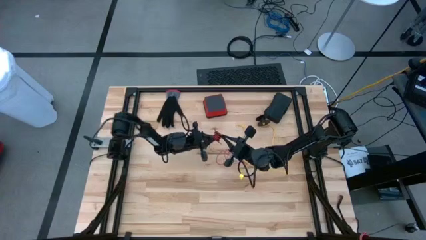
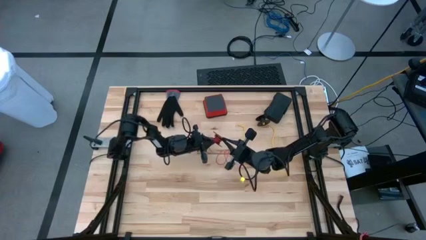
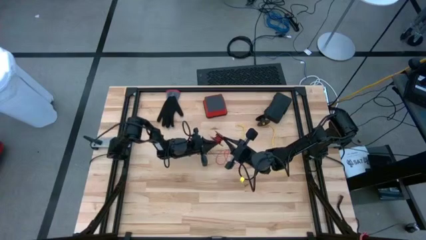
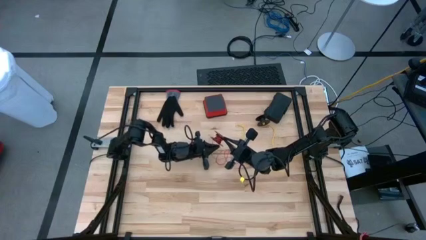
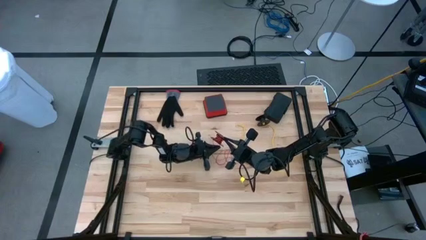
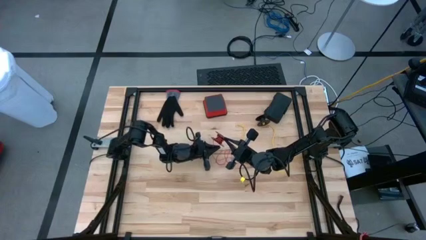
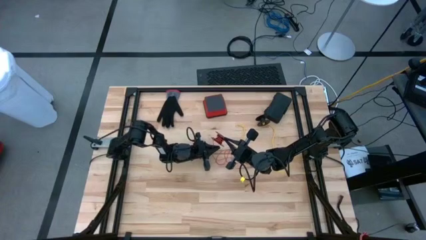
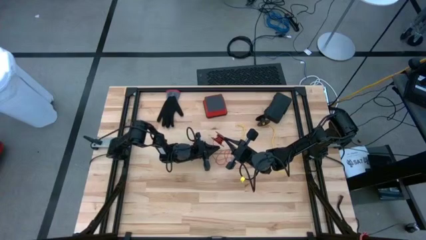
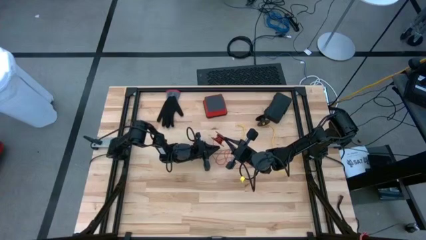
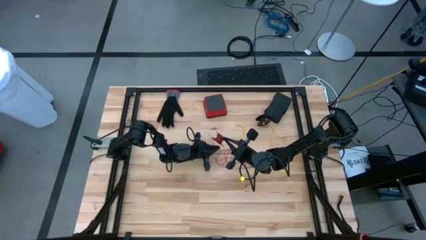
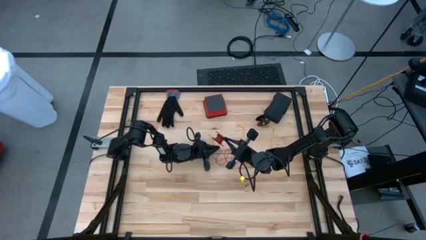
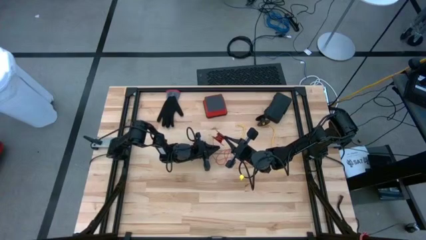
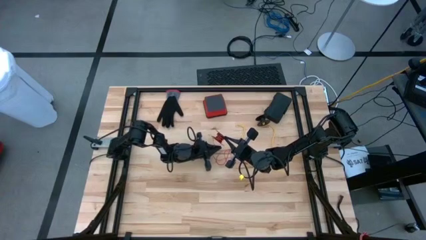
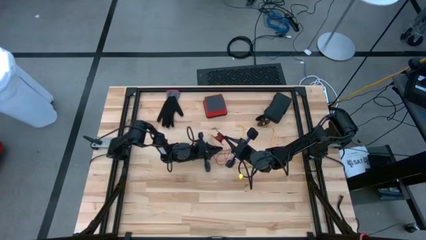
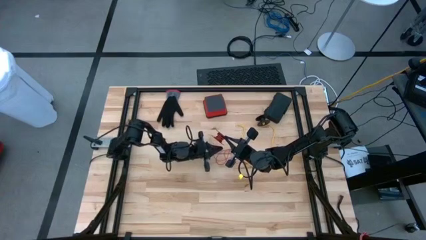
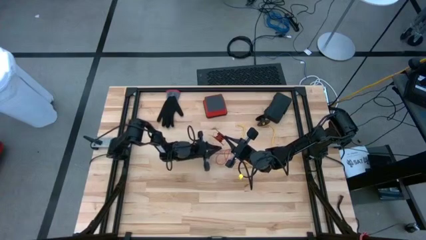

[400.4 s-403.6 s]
Task: Coil cords
Coil the red wire onto the spool

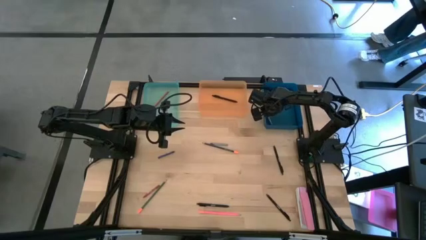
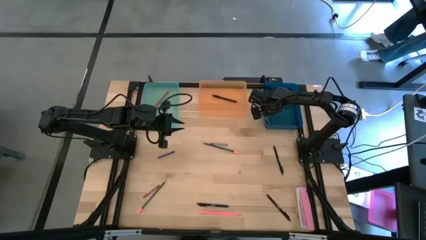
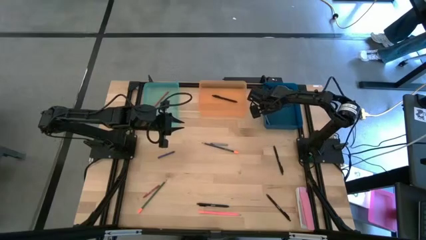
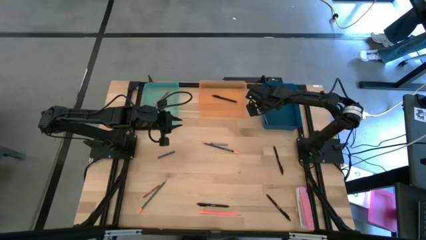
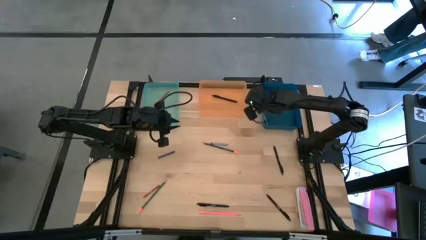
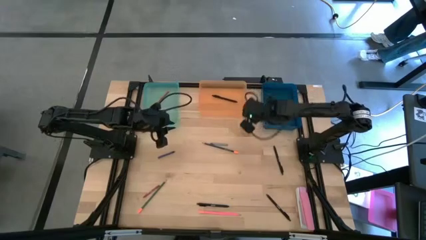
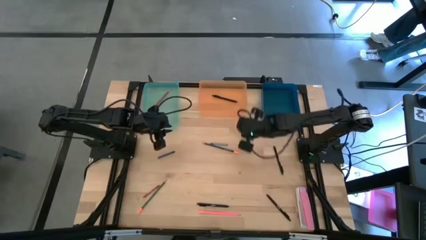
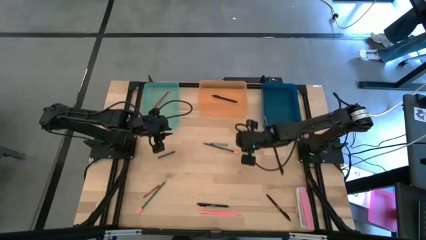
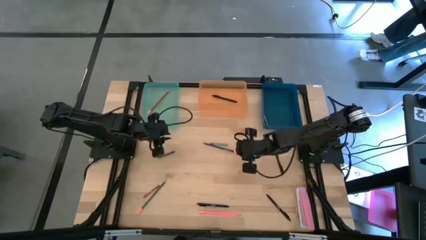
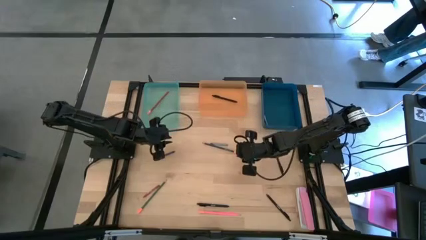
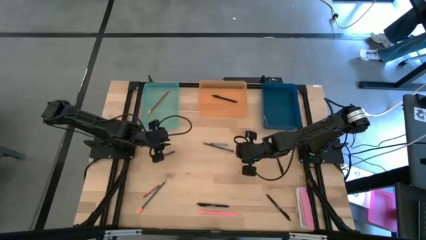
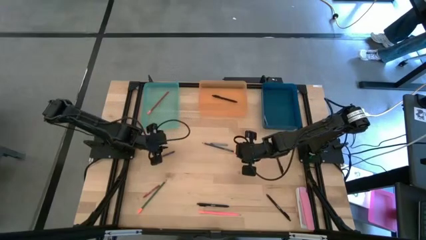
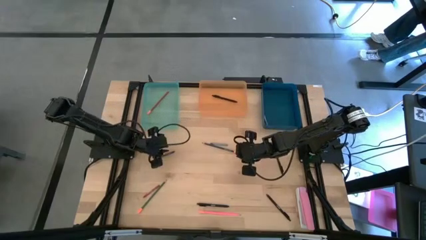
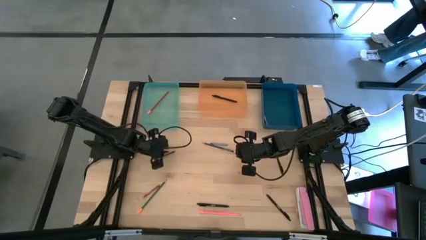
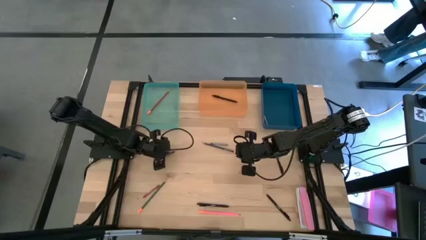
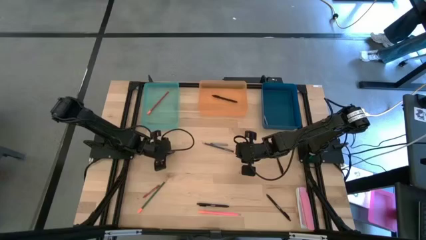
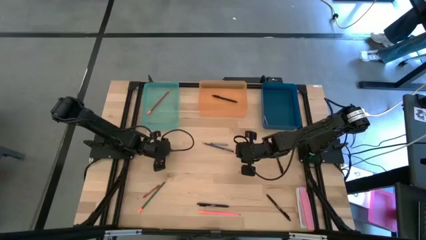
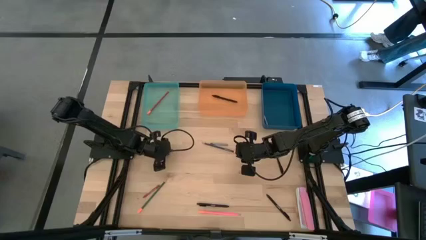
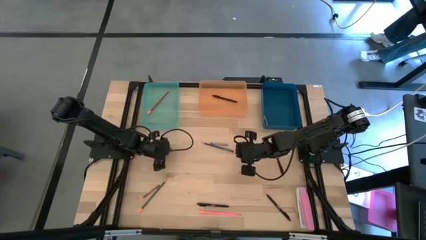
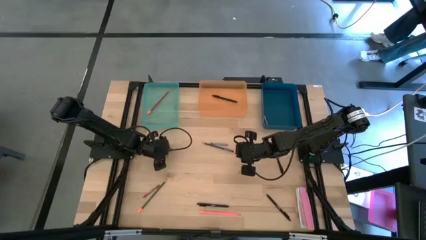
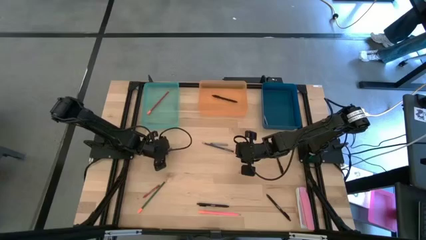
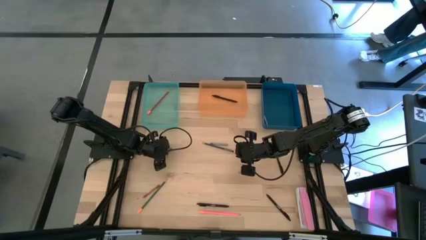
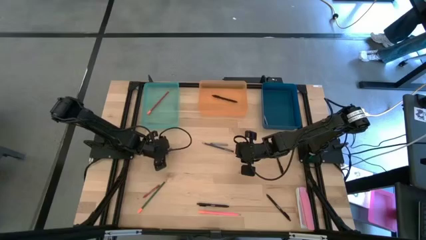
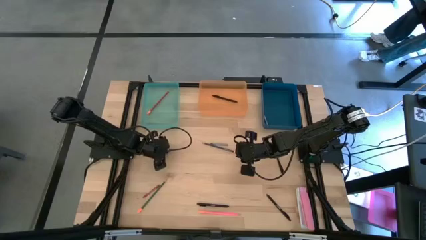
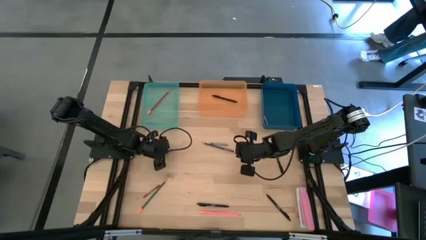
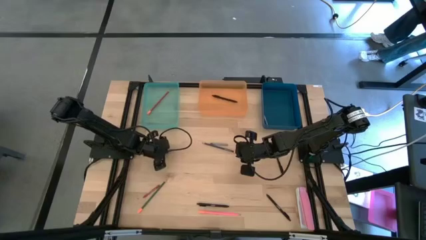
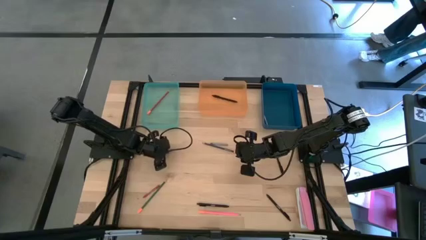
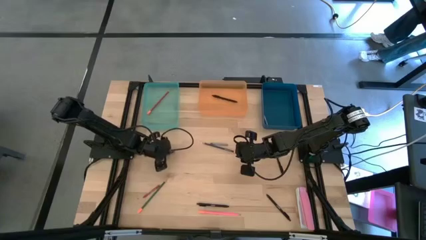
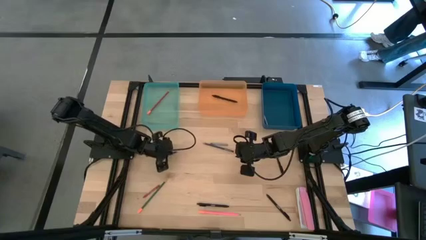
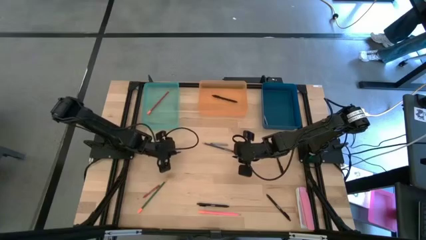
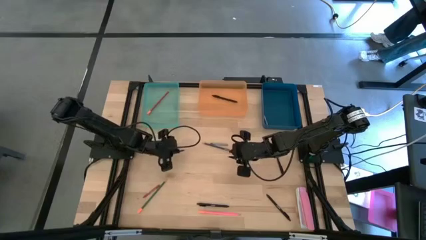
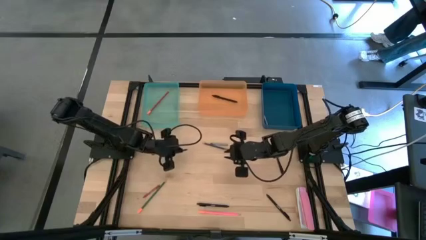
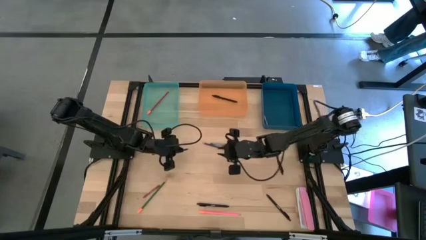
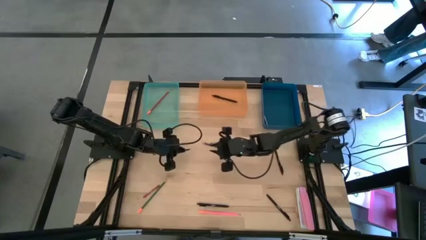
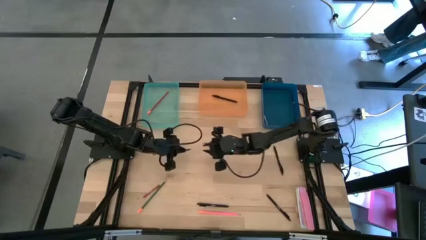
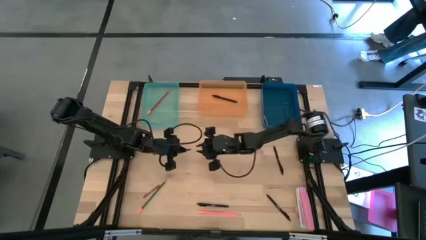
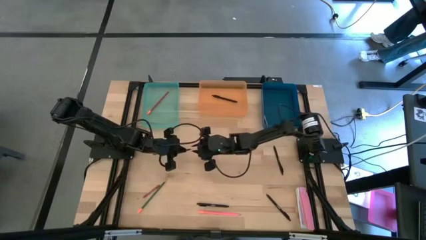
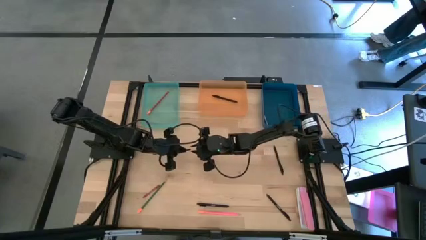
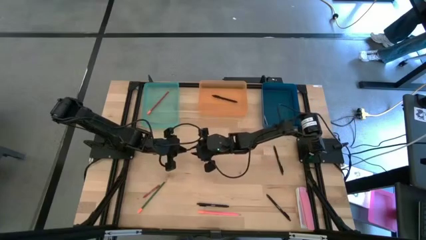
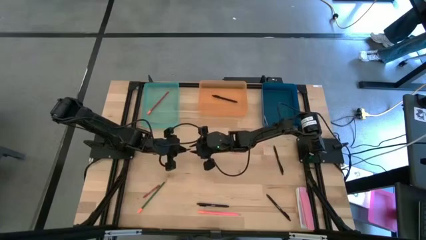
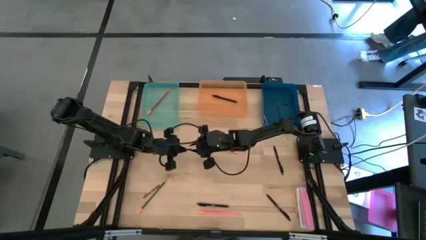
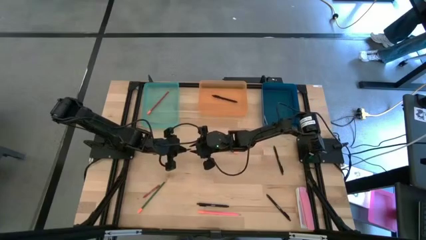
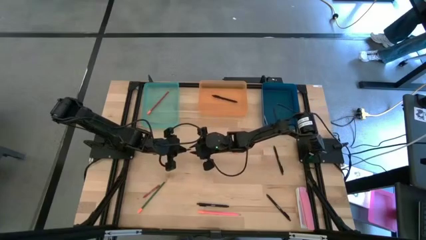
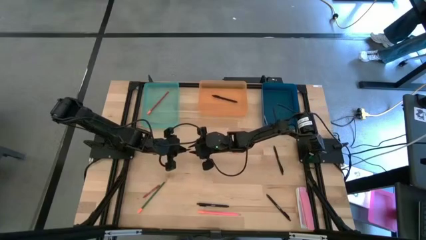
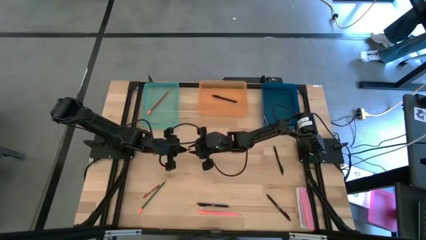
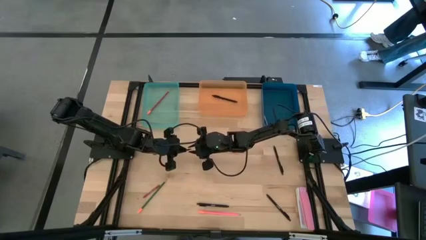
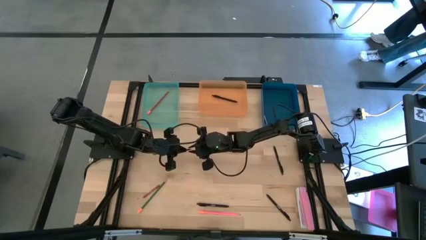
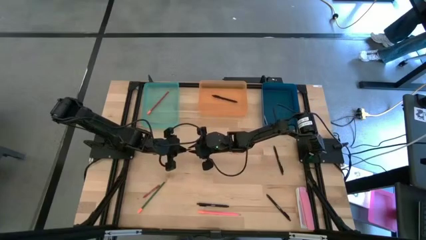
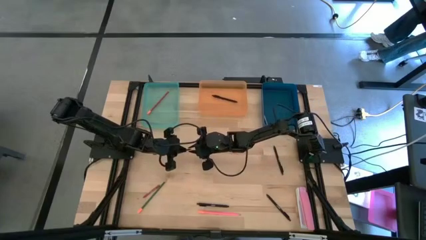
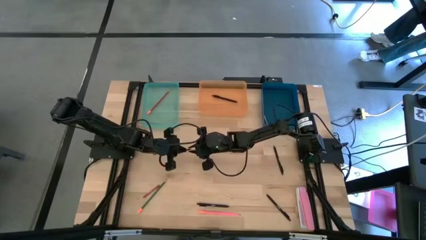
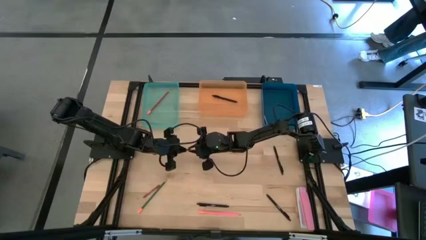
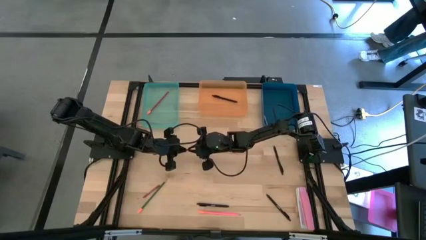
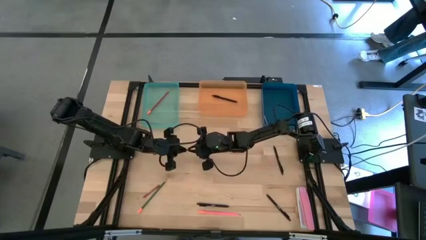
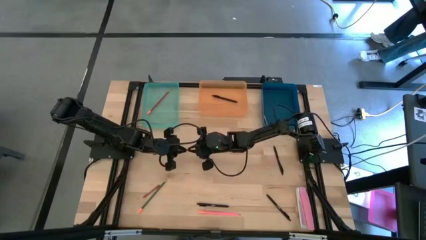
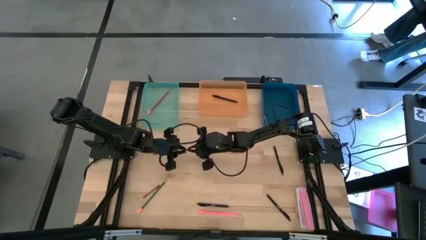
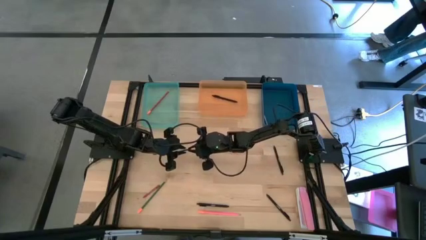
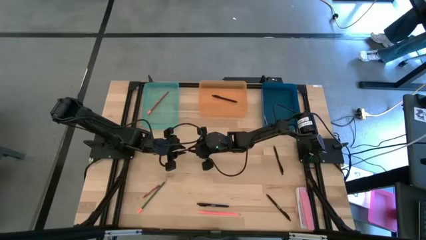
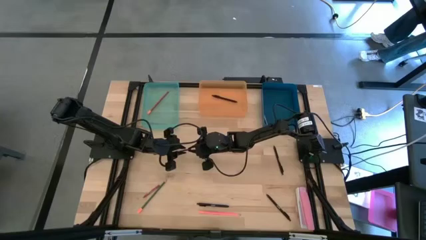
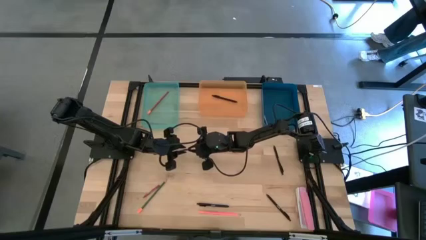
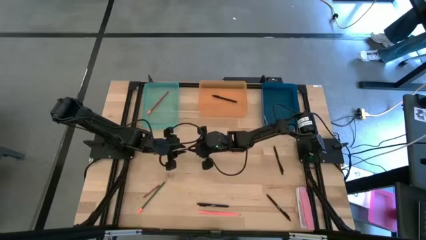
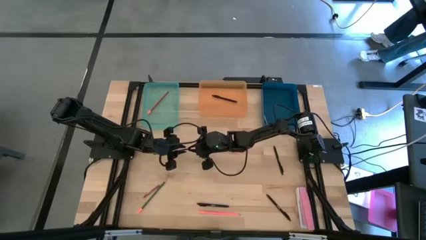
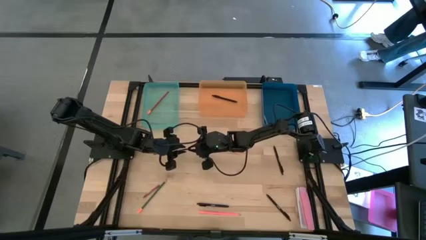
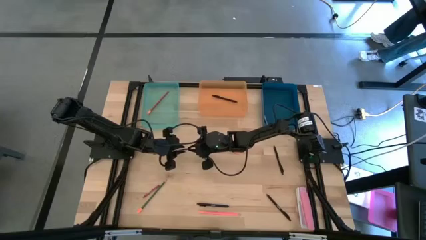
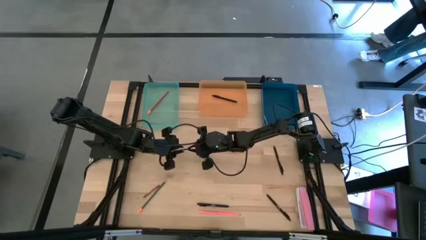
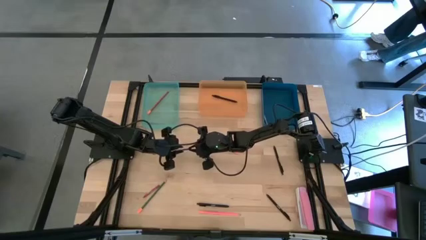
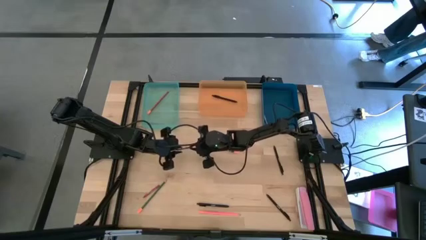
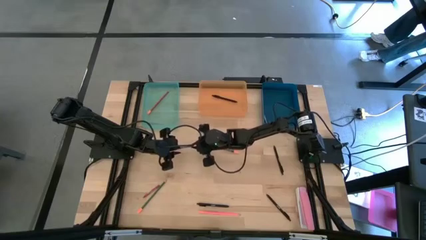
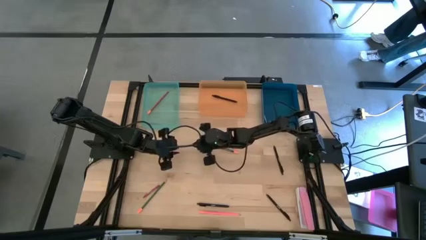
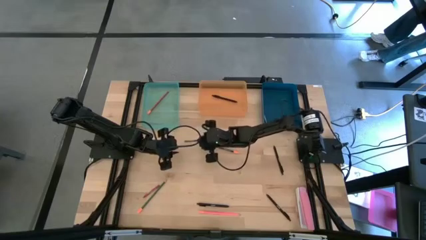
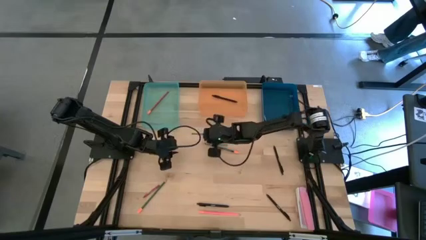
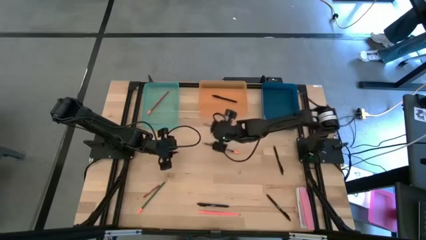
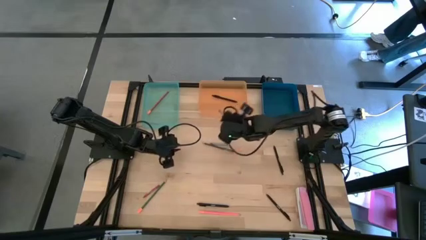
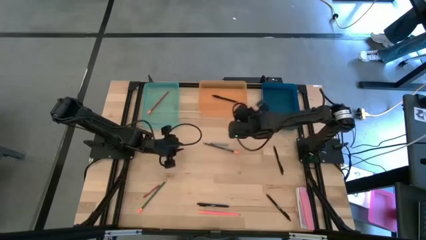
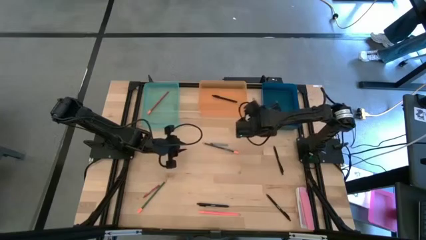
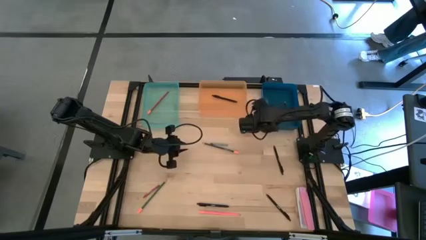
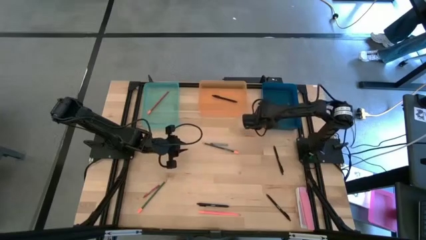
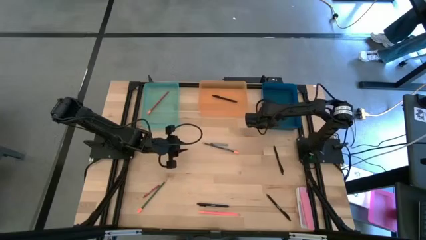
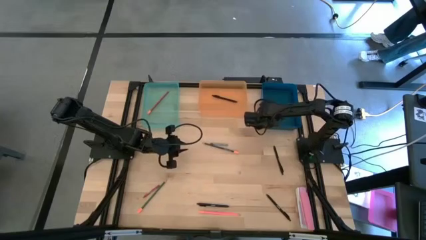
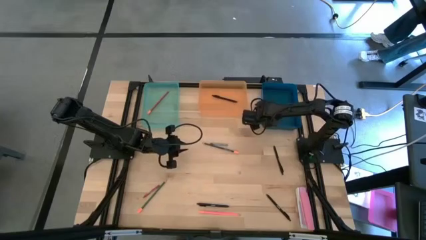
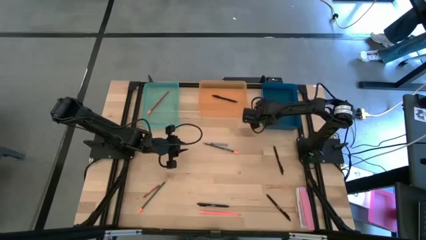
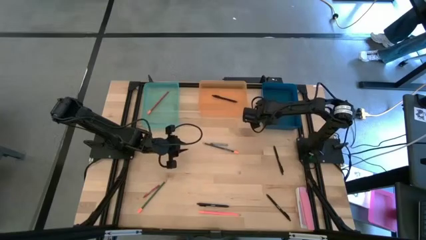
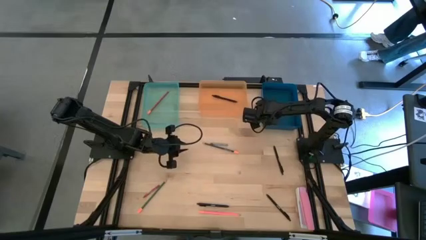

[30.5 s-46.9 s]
Task: Sort crayons/erasers/pens/pencils in bins
Put the blue crayon into the blue bin
